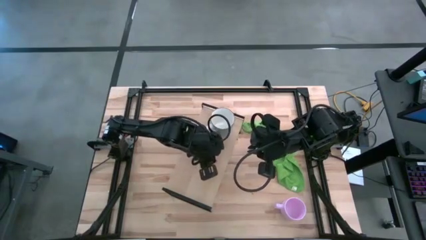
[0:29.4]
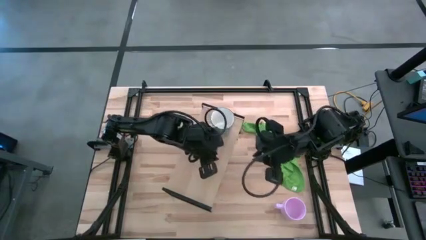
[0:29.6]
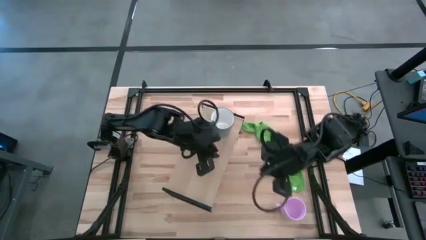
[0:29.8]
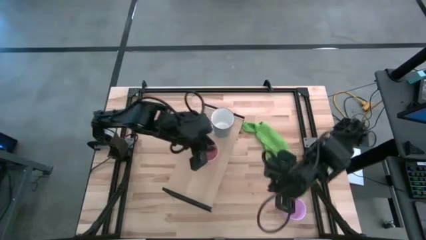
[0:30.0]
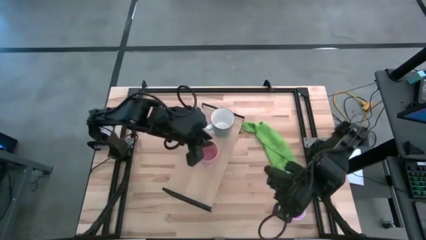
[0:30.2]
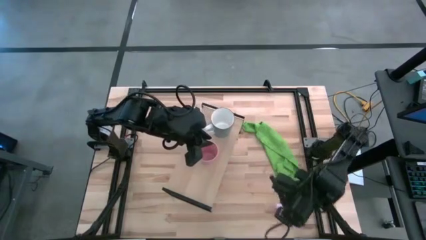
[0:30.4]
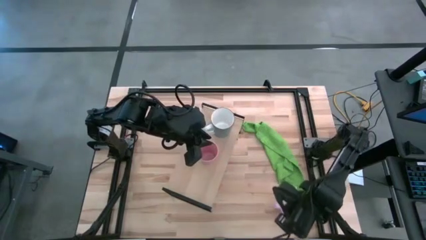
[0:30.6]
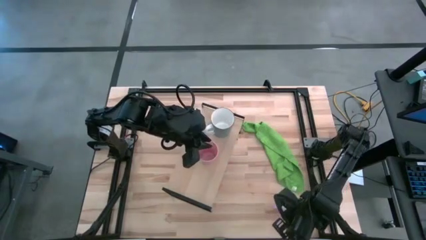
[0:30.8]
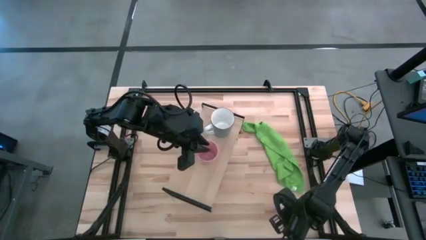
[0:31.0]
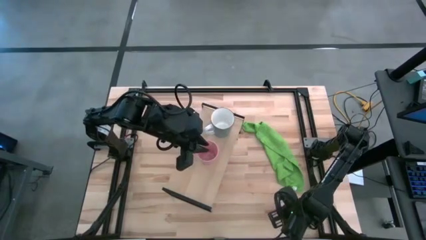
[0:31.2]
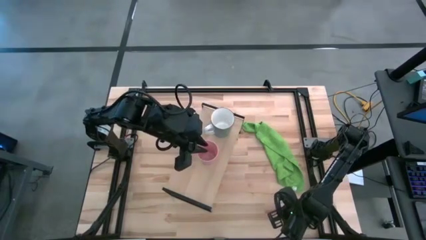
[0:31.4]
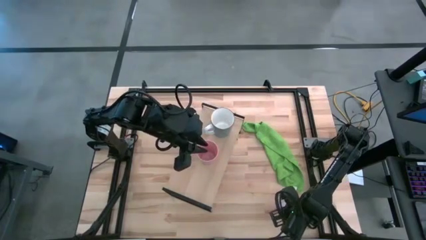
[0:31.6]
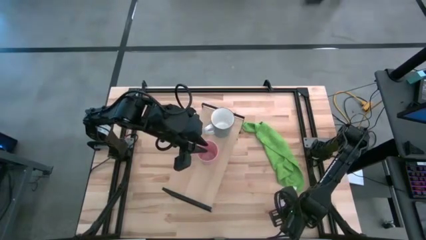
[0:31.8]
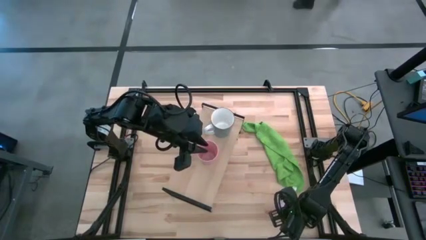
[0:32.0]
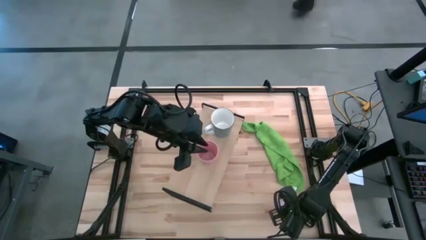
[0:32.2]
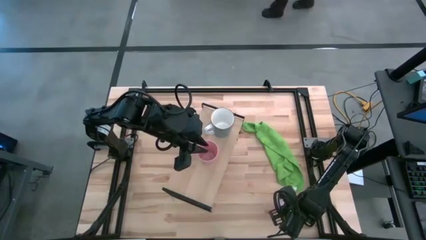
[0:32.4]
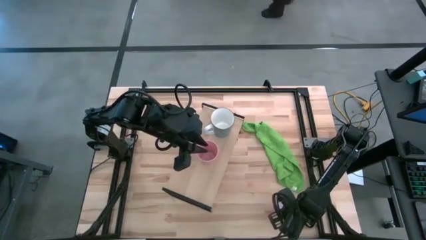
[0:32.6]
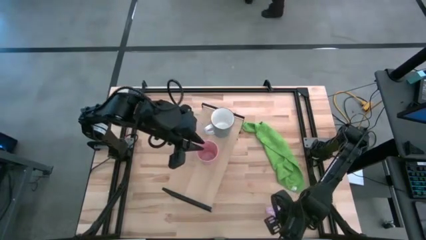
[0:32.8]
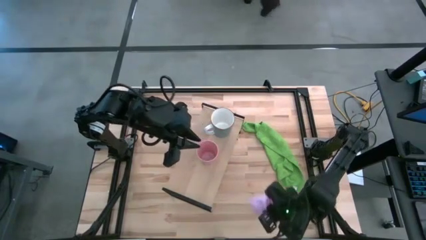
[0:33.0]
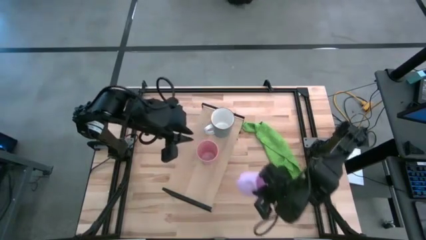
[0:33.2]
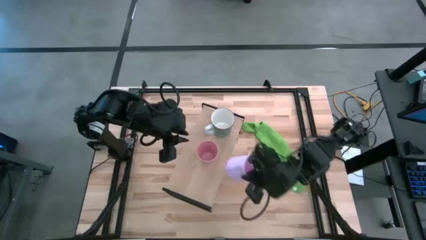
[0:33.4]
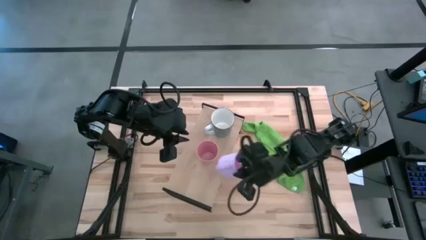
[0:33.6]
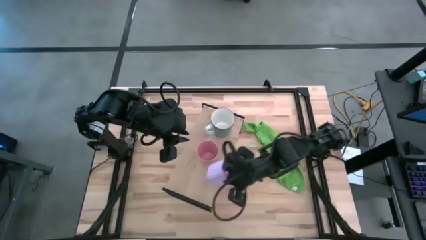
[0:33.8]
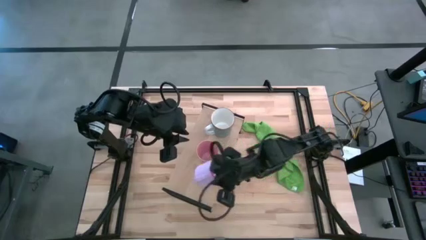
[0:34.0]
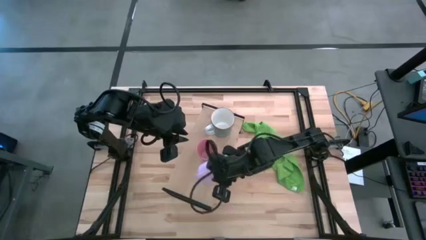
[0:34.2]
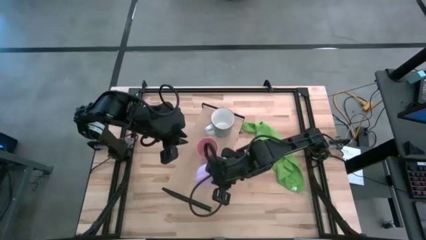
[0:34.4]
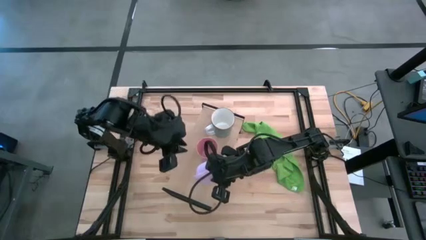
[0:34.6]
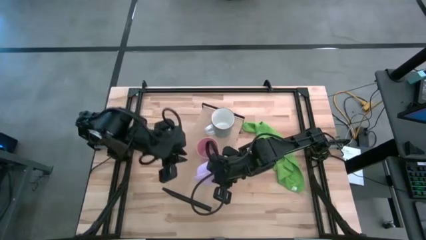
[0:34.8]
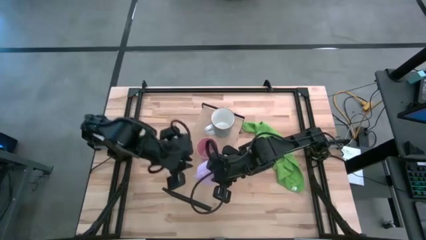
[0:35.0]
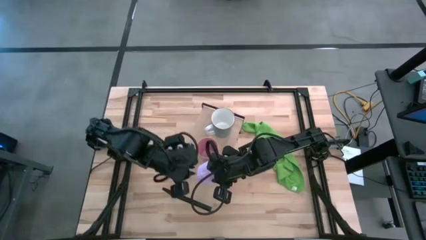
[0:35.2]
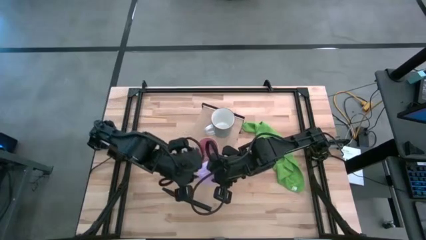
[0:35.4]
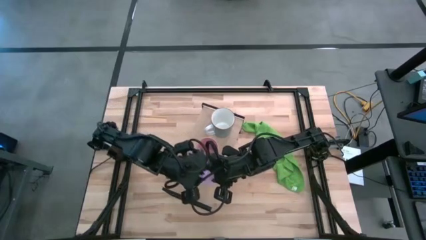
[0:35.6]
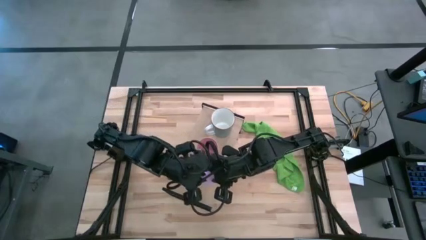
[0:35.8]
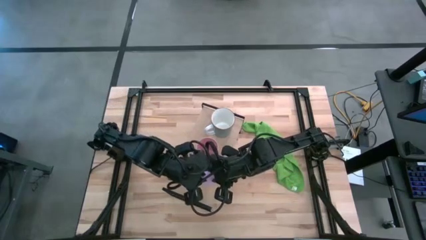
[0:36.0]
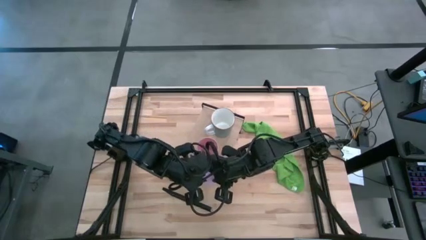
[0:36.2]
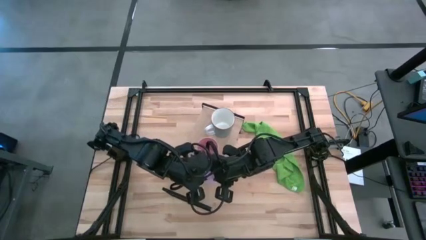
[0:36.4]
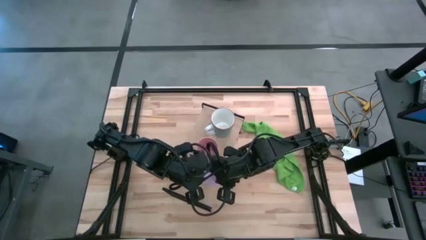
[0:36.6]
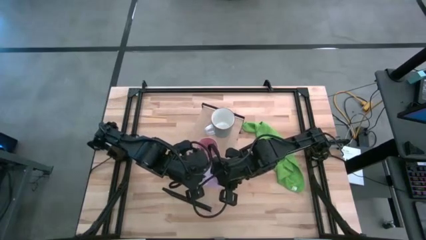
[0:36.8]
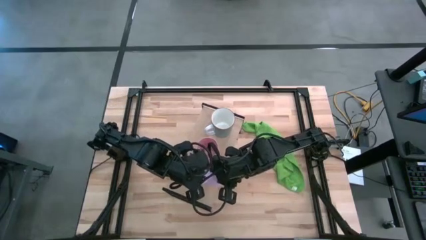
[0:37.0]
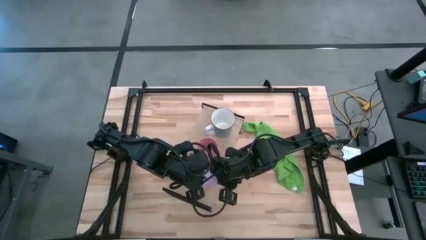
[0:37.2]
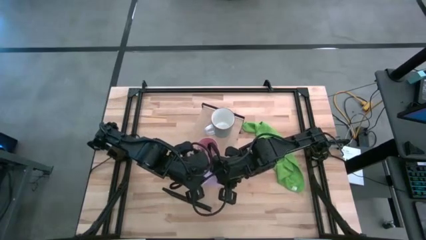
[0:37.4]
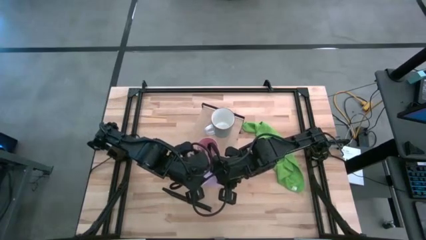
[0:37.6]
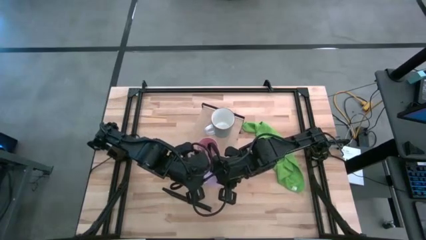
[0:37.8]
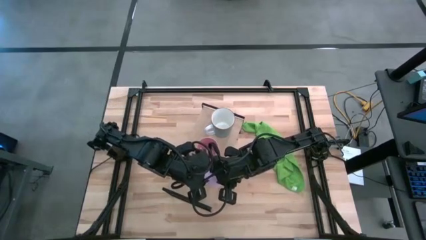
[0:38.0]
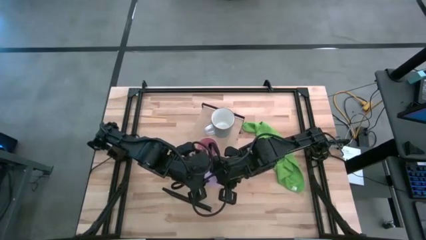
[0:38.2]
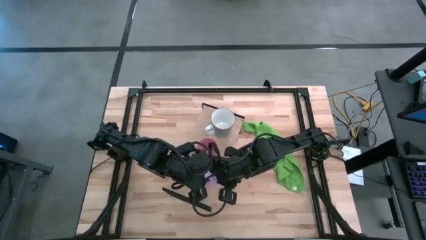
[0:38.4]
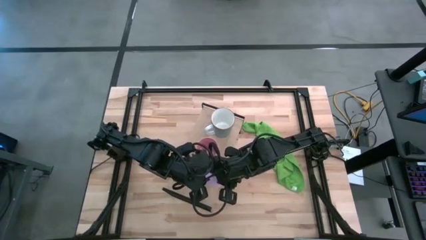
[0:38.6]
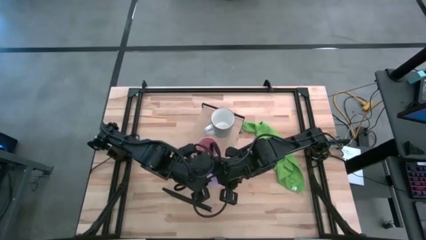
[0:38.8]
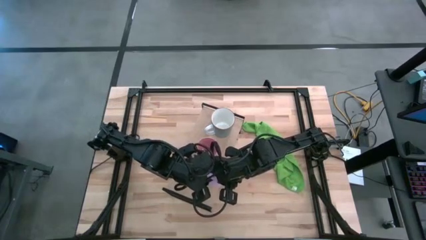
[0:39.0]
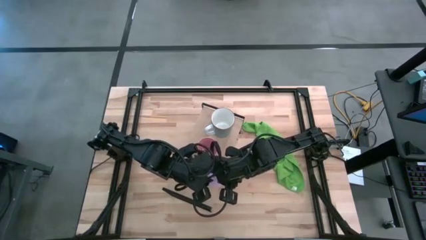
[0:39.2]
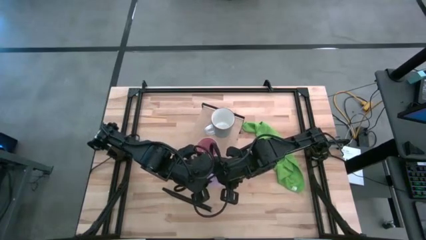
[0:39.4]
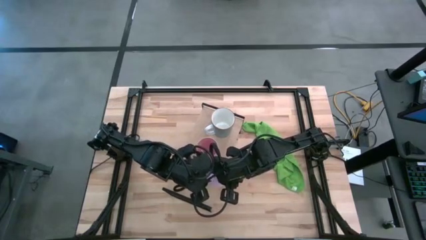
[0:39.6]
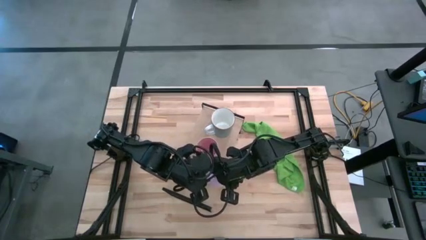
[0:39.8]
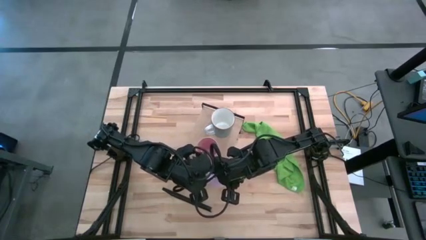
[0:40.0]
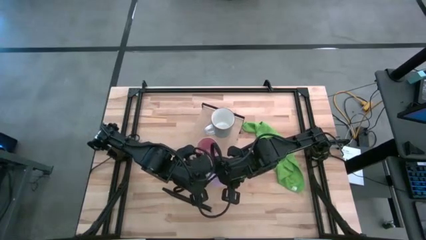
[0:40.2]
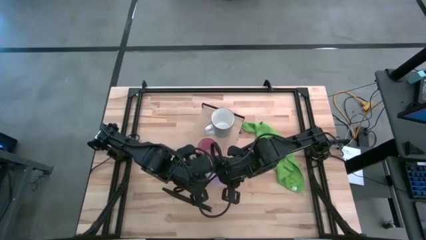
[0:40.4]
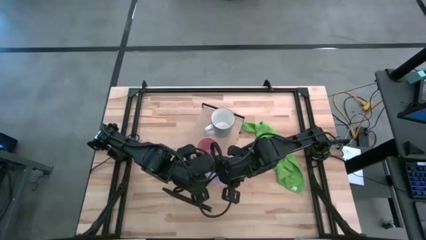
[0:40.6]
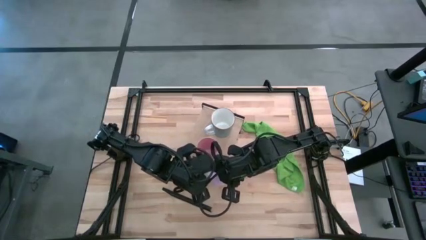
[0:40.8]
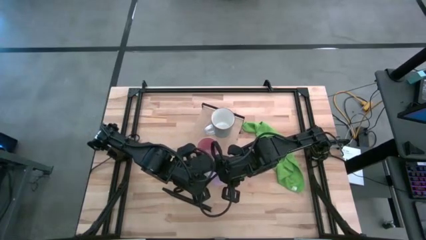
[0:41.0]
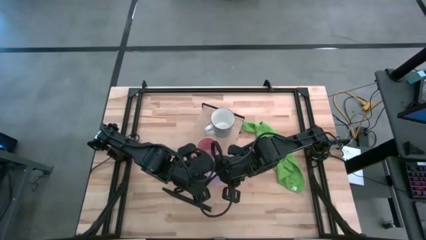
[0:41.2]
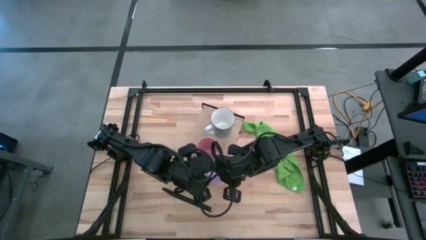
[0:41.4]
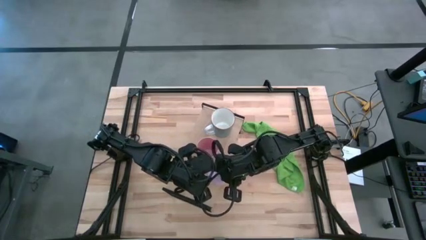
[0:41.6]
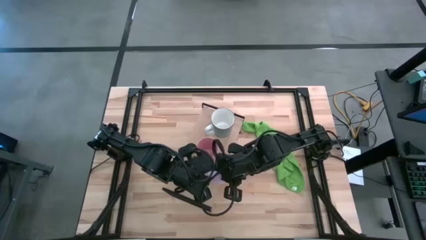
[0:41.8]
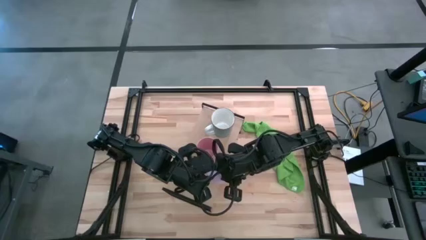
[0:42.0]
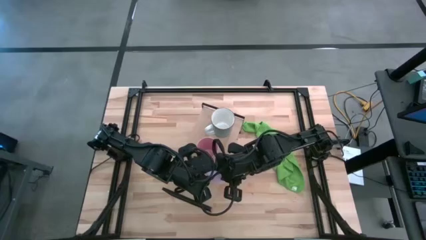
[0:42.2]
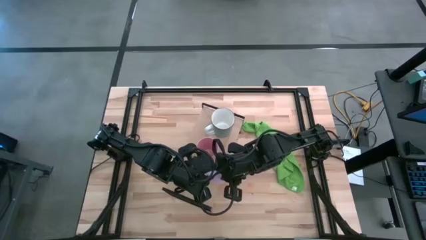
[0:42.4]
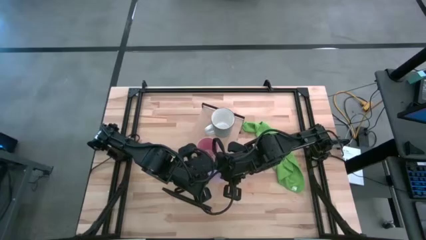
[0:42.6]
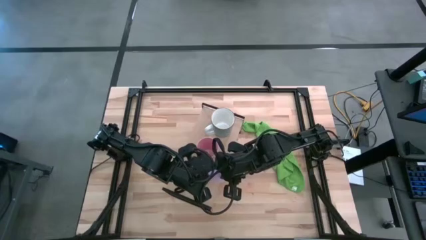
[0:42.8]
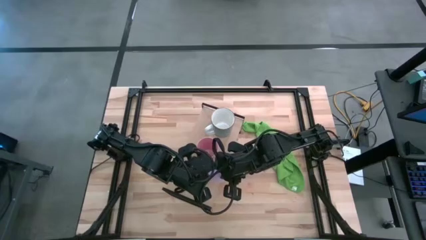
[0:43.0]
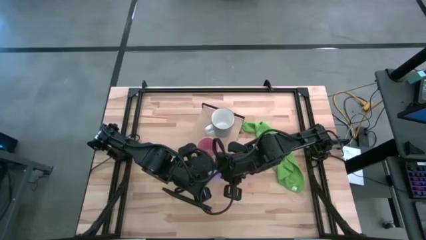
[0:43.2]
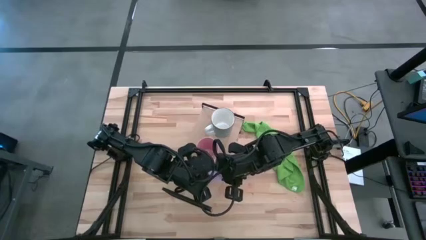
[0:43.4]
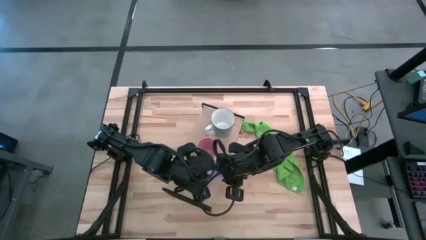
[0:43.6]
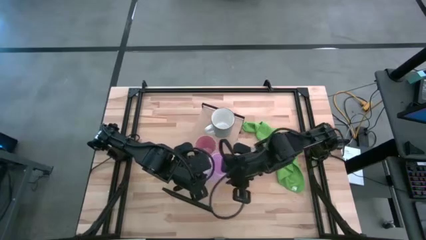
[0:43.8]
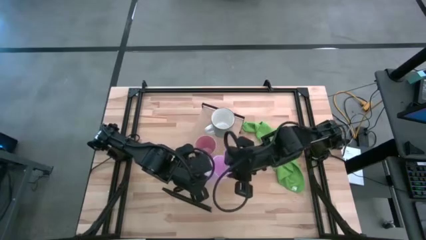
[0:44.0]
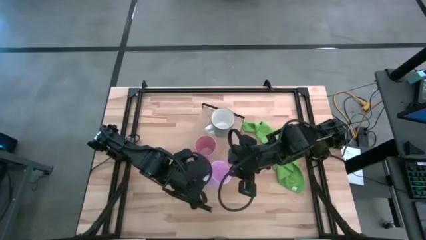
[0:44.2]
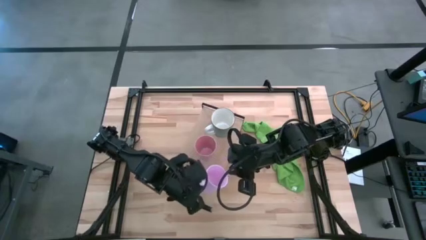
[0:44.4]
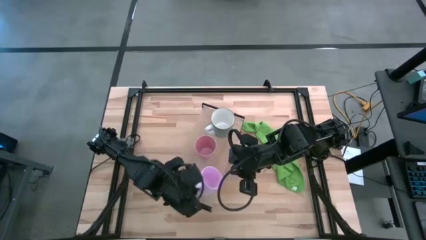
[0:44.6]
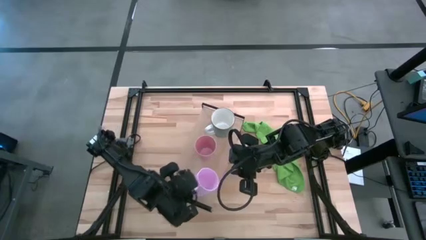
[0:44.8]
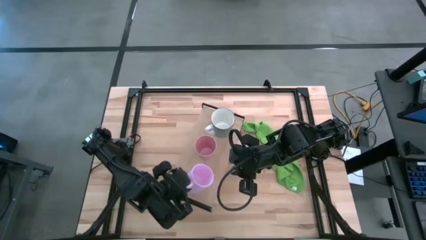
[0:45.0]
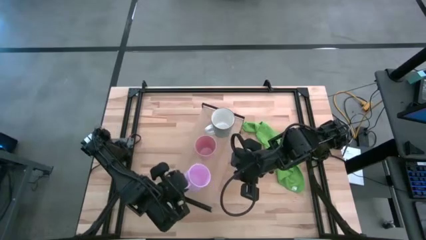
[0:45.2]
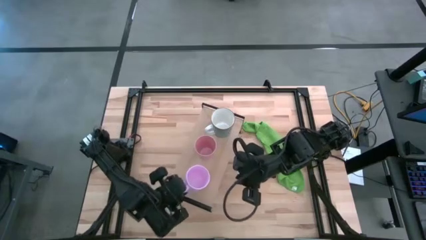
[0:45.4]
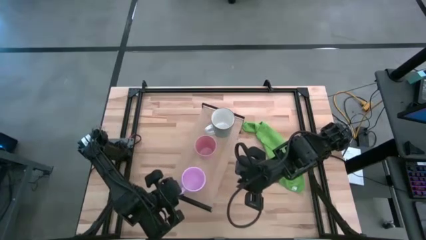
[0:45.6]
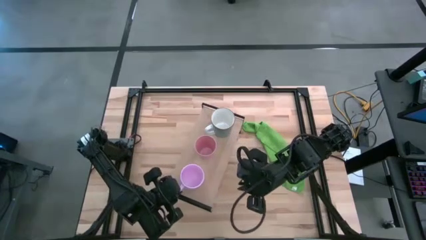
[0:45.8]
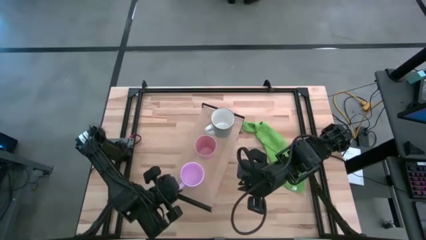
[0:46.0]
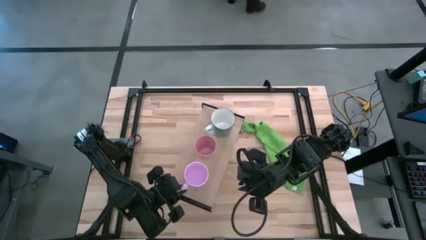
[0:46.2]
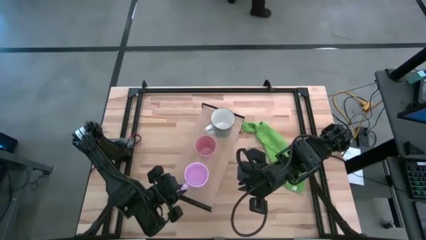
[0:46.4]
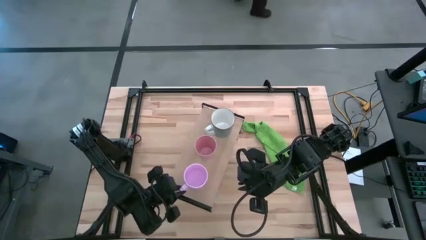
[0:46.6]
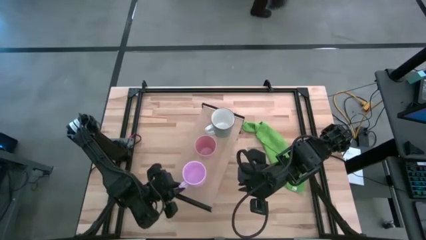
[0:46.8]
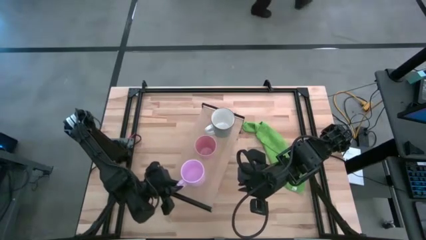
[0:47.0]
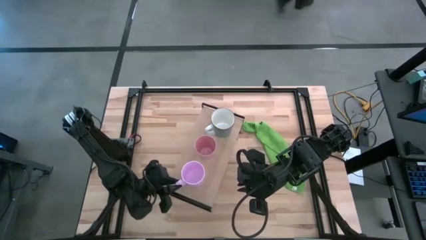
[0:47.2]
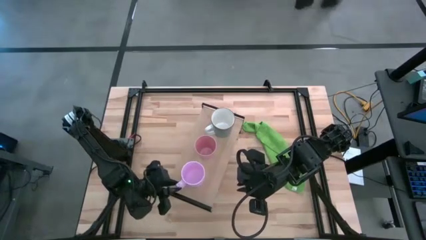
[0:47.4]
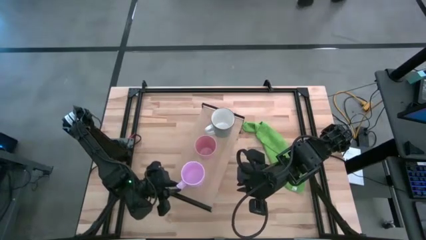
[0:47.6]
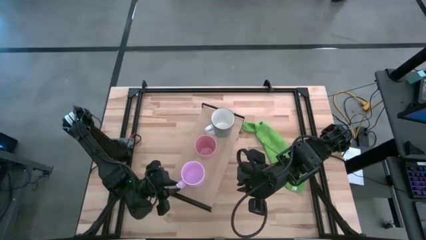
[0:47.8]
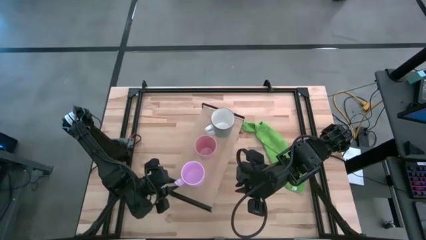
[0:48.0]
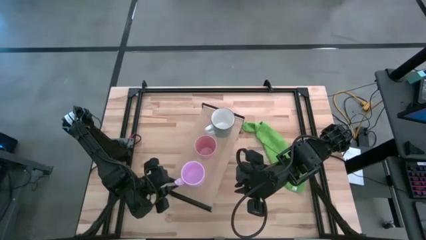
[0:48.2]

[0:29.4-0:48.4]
Task: Stack small to large cups/mugs on shelf
Put the purple mug on the shelf
